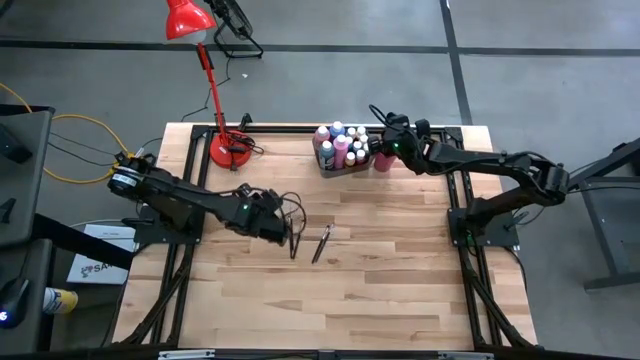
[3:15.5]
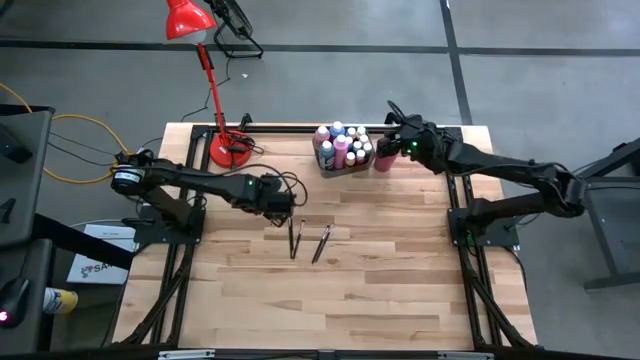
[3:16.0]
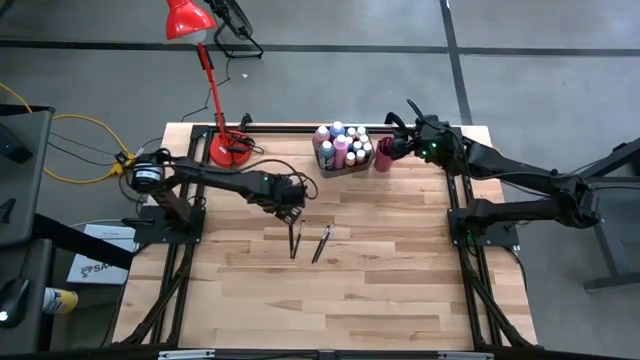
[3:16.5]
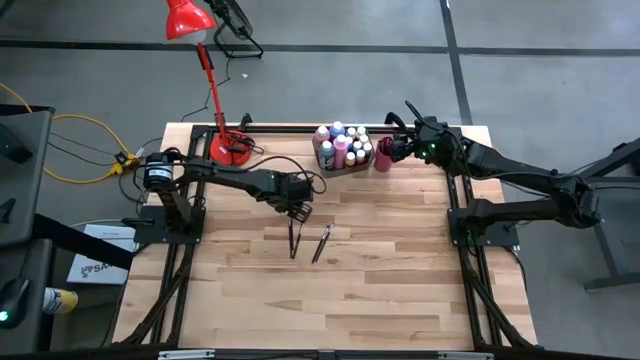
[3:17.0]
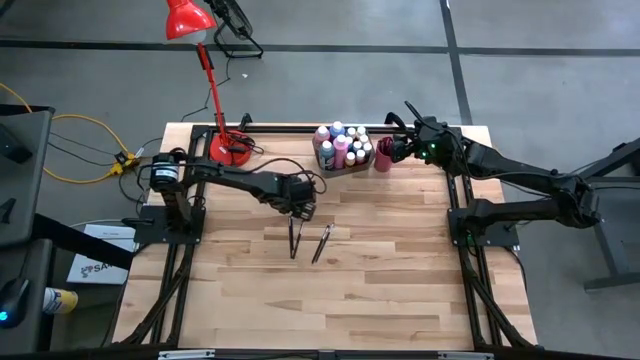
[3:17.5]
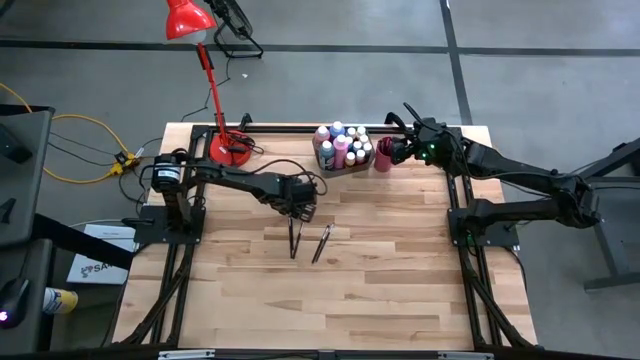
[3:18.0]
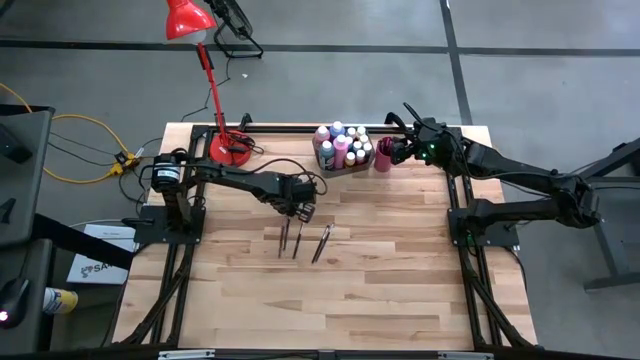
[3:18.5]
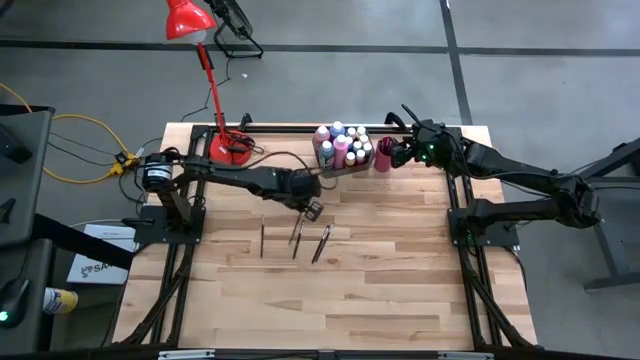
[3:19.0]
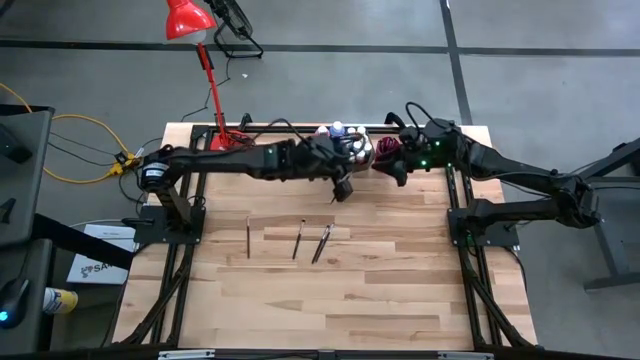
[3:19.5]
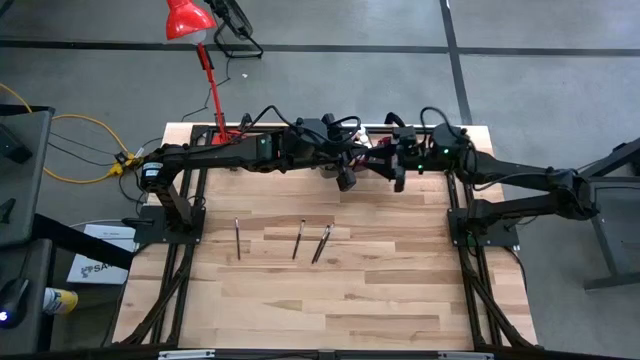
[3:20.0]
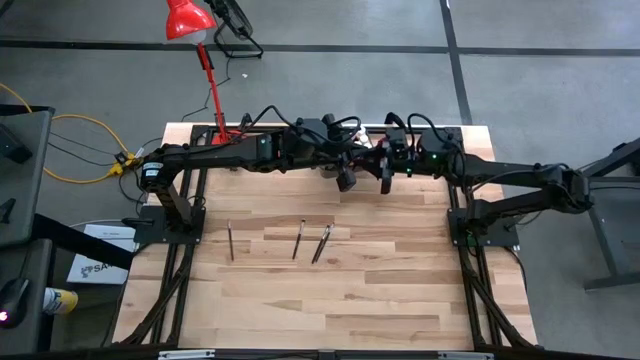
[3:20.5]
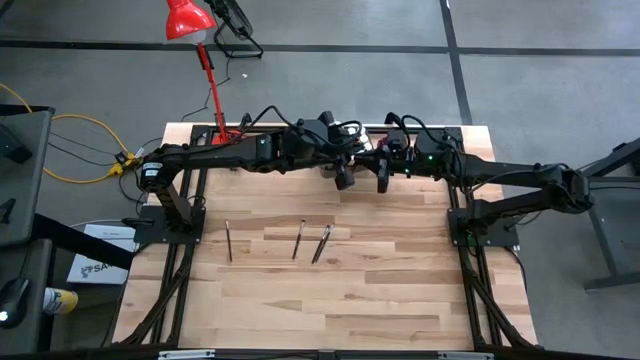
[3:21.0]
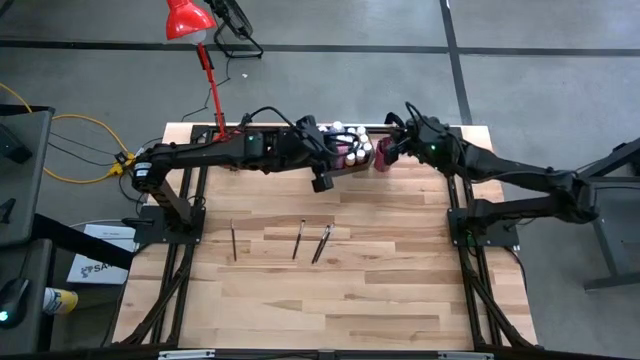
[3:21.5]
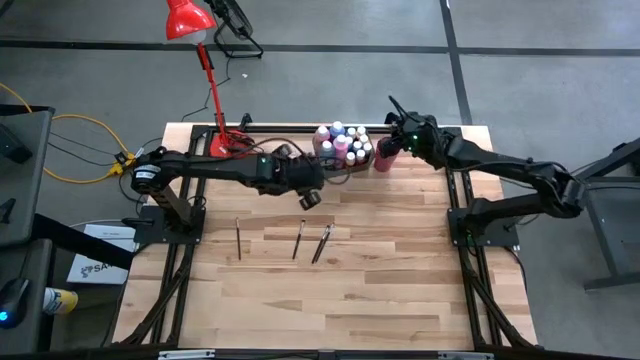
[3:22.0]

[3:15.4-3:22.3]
Task: Pick & Place Paint Supplies
Put the black paintbrush into the red cup

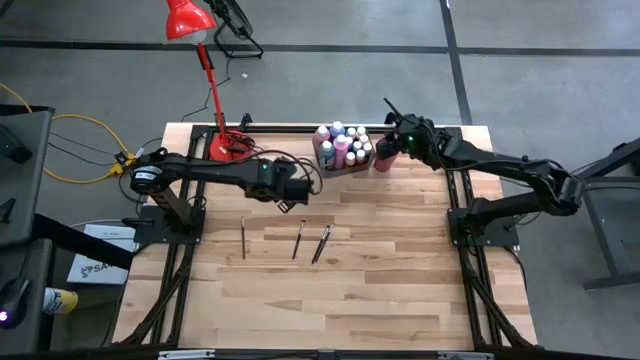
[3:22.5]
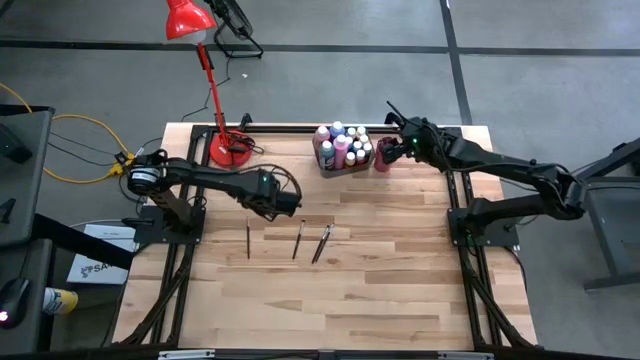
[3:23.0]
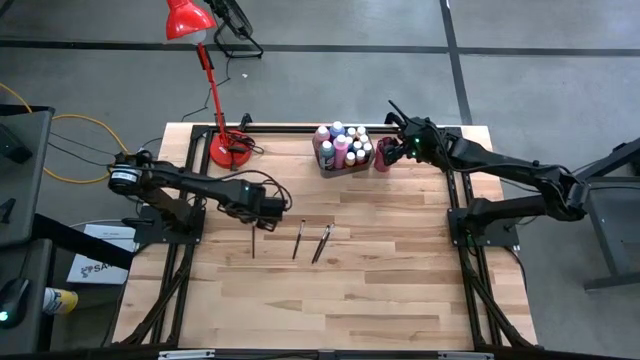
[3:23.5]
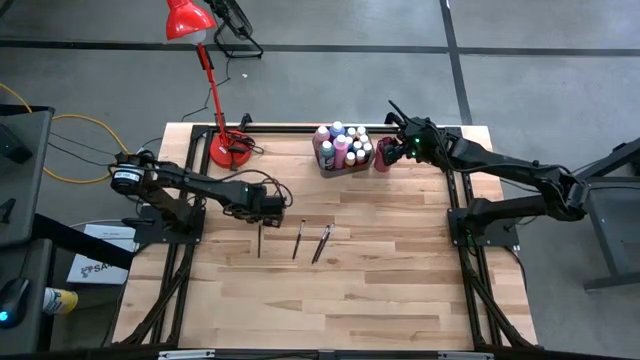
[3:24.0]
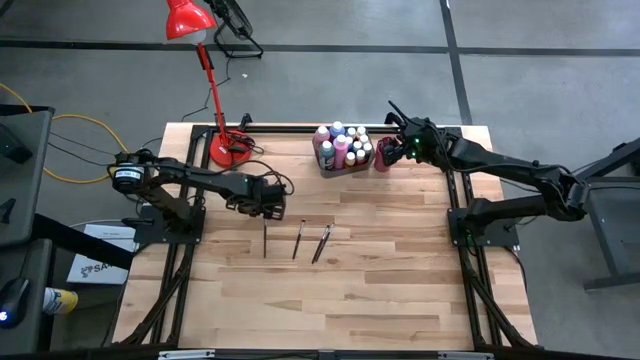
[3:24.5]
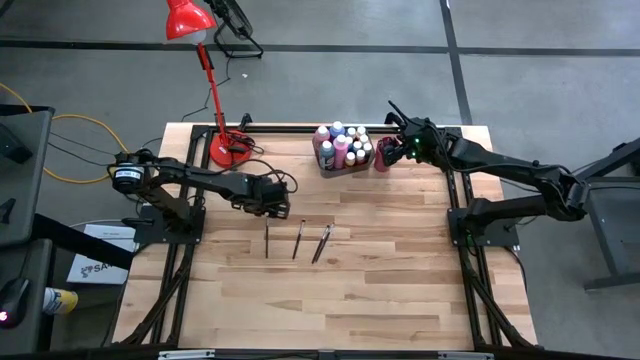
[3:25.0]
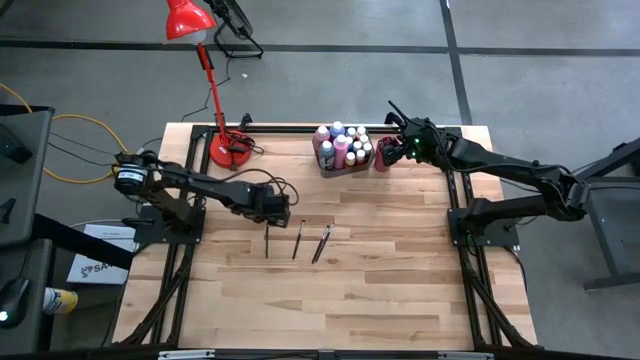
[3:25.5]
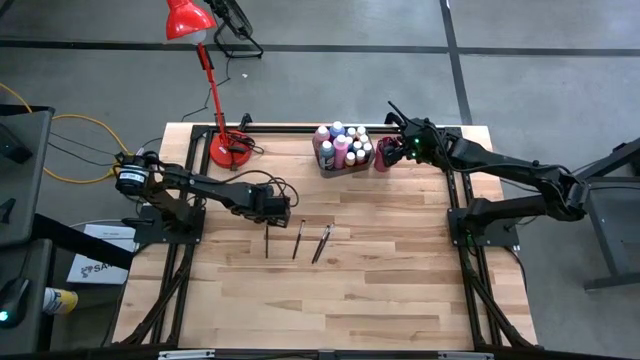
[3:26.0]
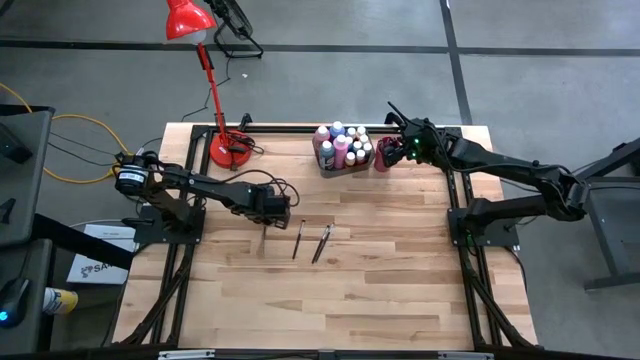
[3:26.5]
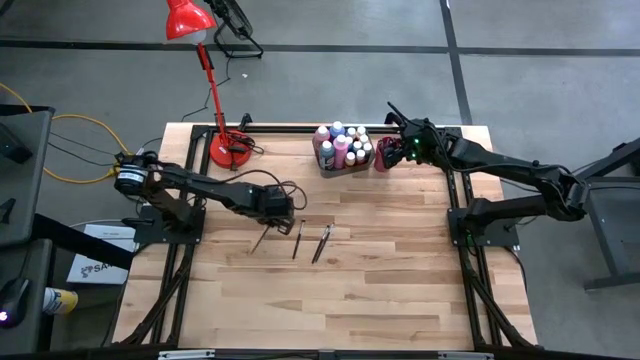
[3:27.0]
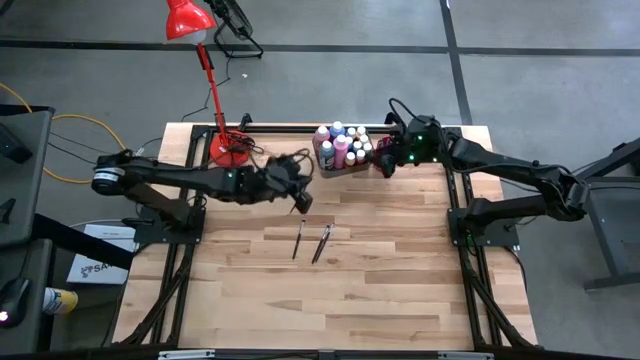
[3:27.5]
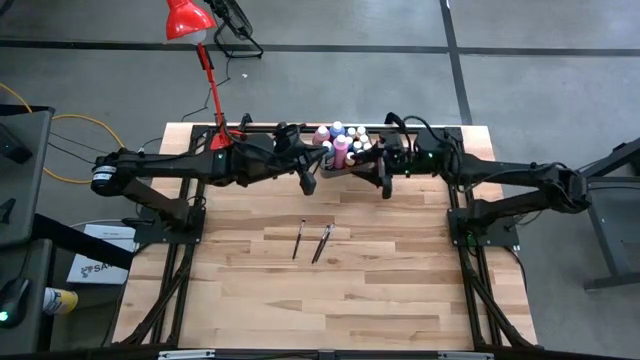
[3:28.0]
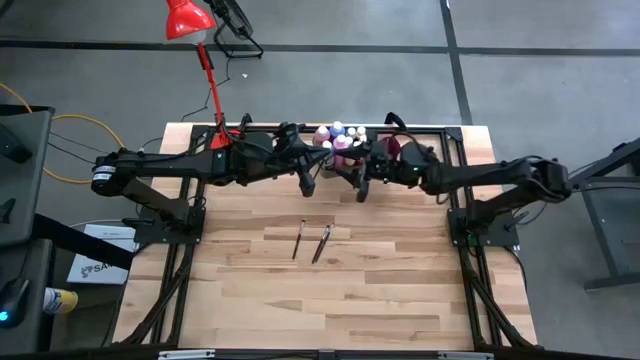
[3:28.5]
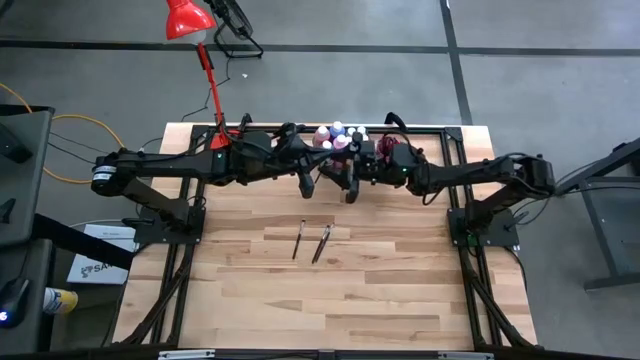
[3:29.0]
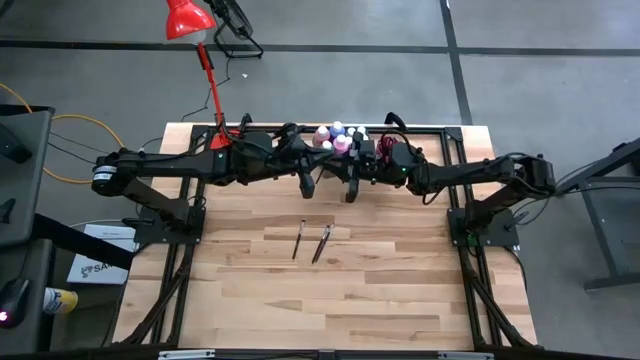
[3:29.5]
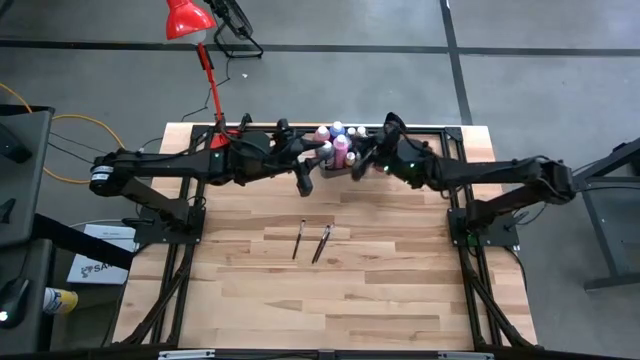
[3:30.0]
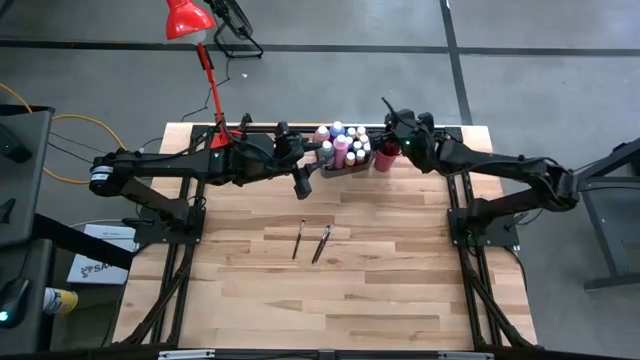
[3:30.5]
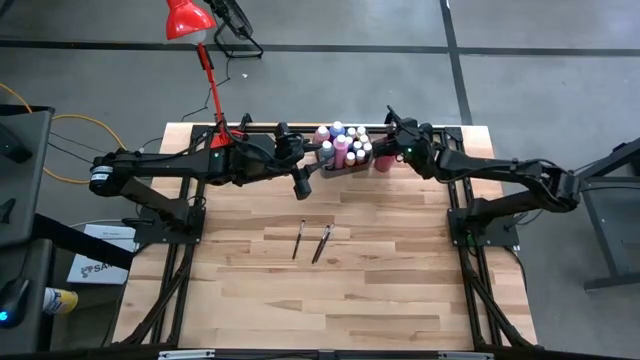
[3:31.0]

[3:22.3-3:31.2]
Put the black paintbrush into the red cup

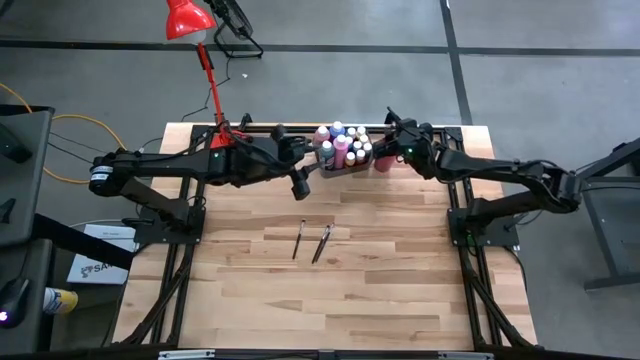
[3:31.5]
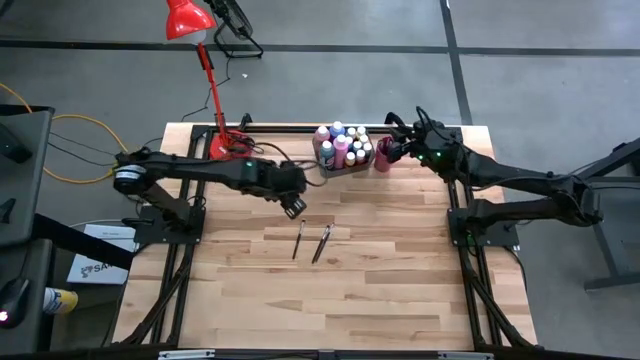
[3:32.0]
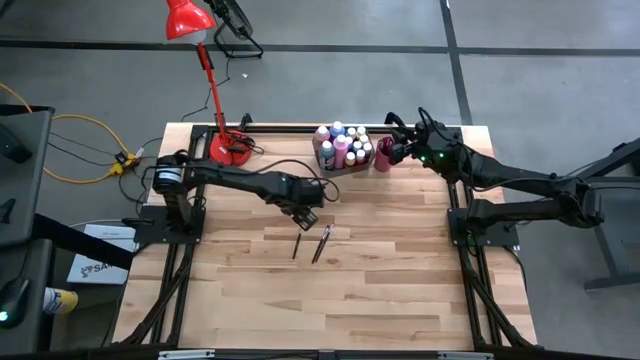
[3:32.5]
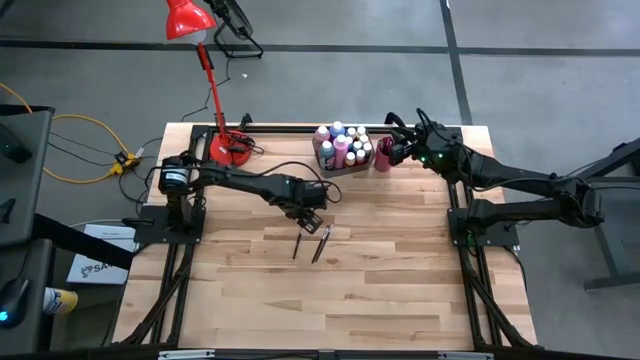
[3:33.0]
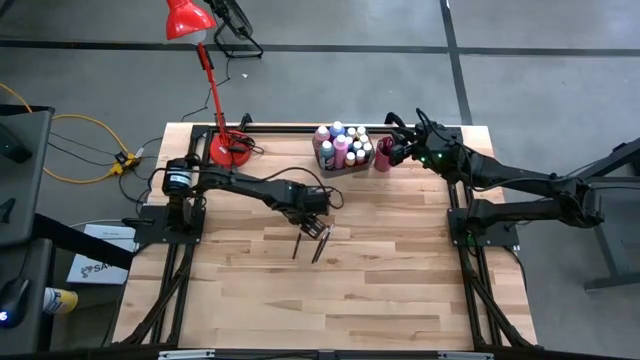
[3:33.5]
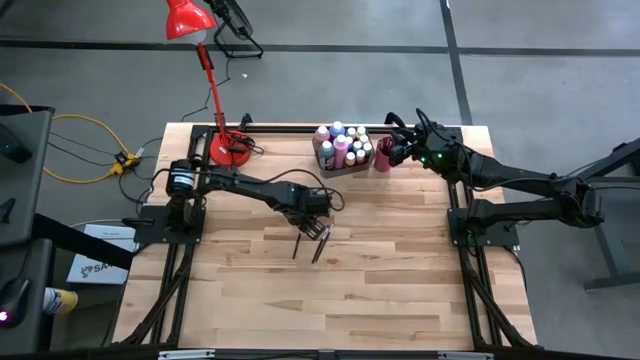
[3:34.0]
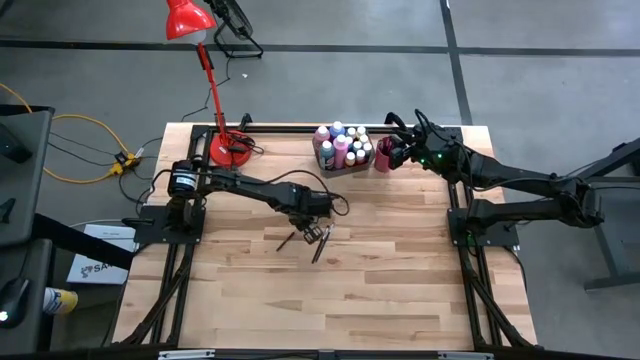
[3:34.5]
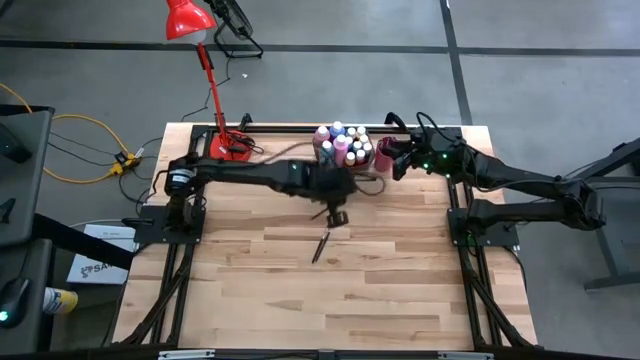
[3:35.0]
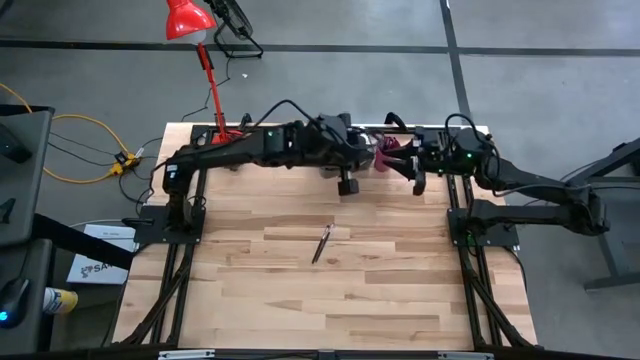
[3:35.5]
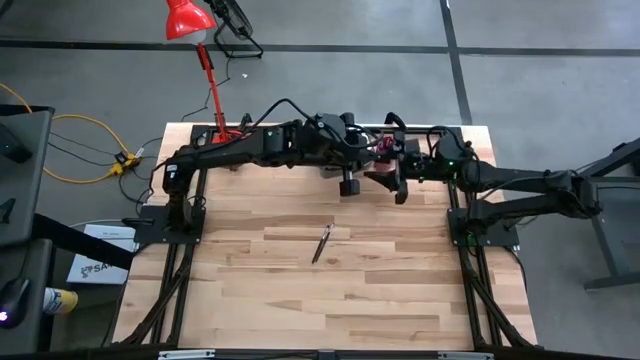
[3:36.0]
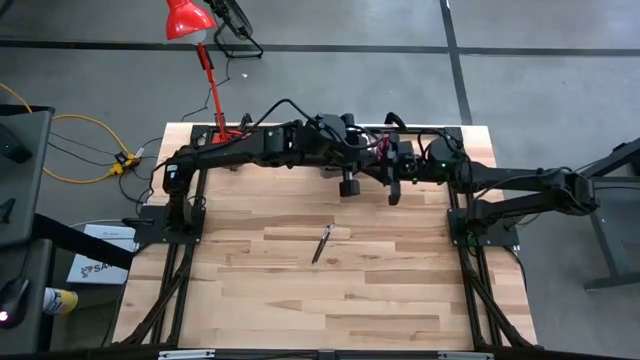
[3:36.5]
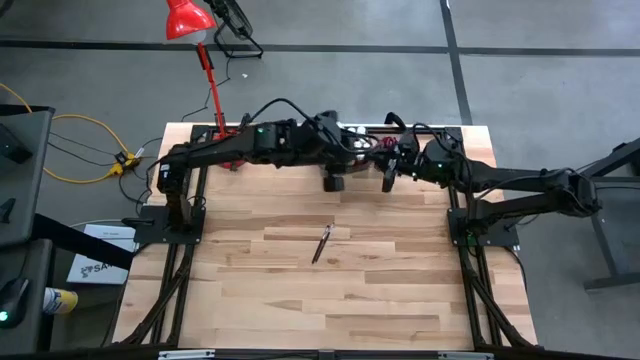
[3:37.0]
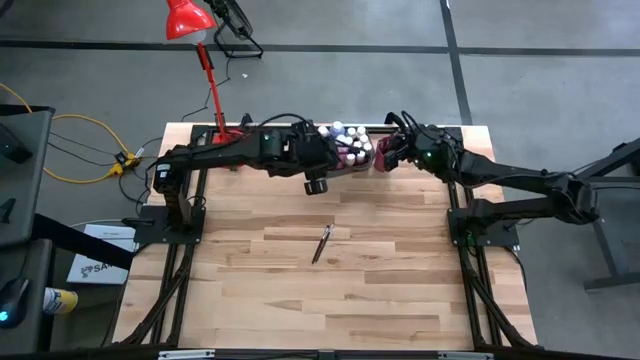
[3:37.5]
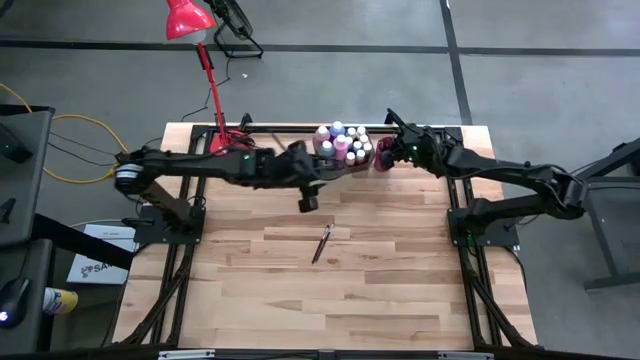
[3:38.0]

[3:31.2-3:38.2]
Put the black paintbrush into the red cup
